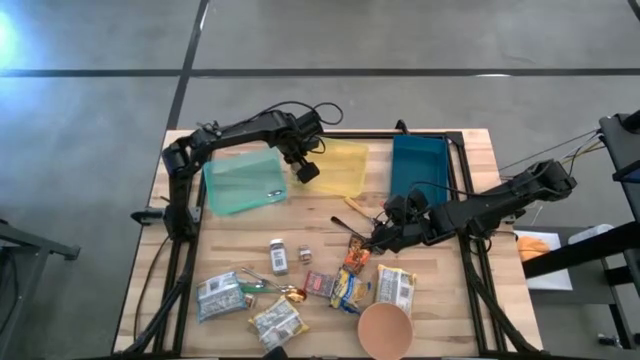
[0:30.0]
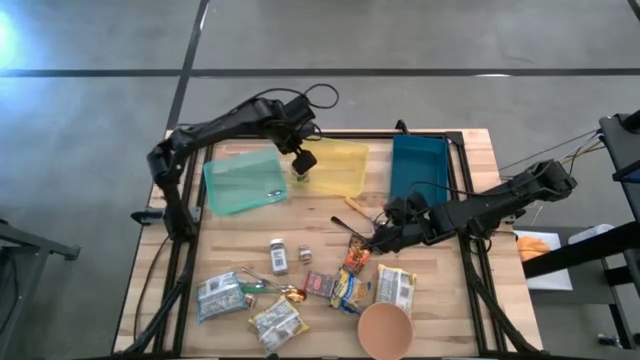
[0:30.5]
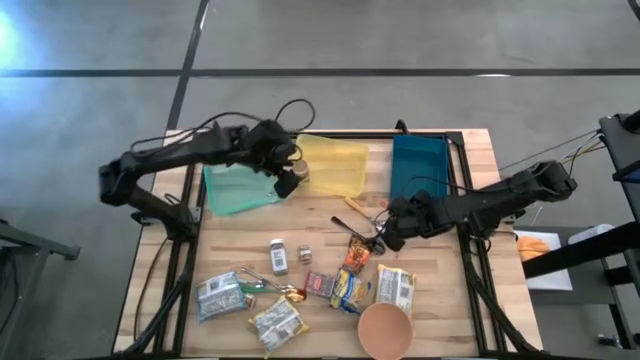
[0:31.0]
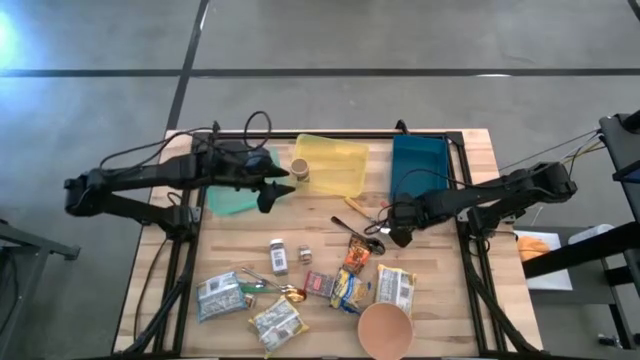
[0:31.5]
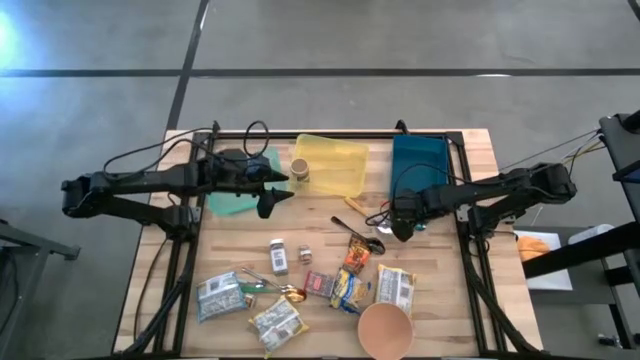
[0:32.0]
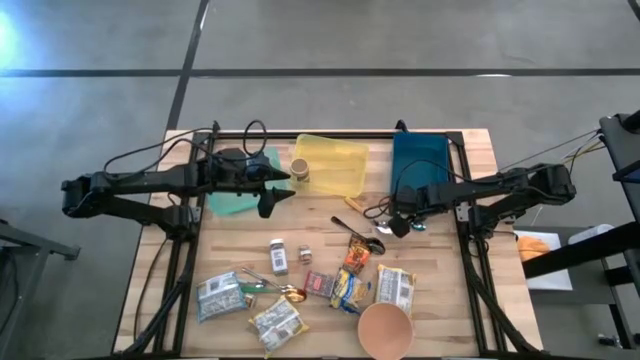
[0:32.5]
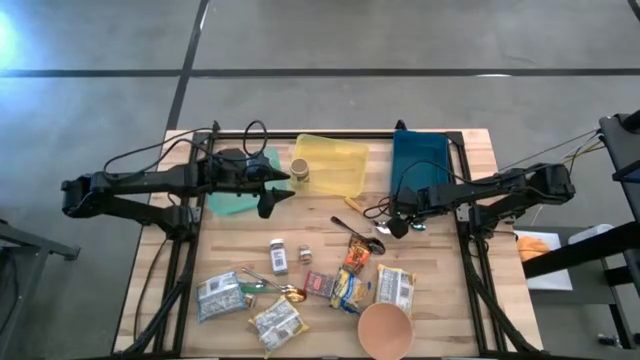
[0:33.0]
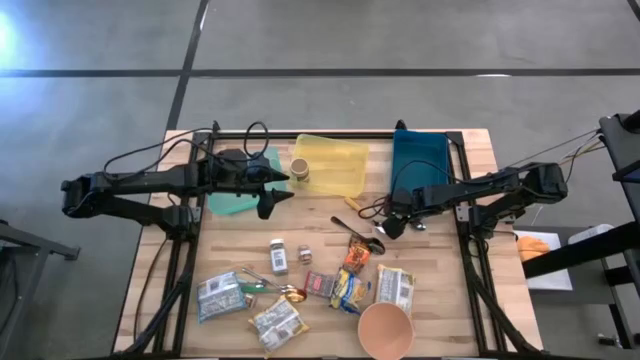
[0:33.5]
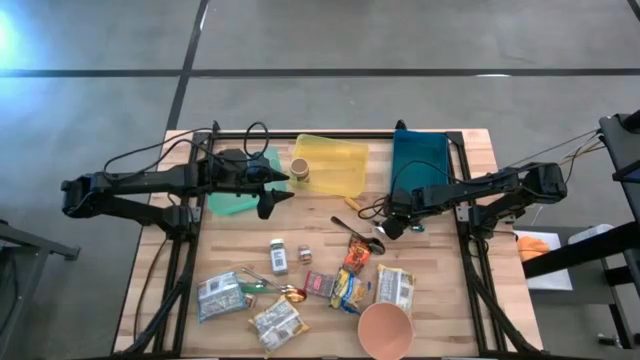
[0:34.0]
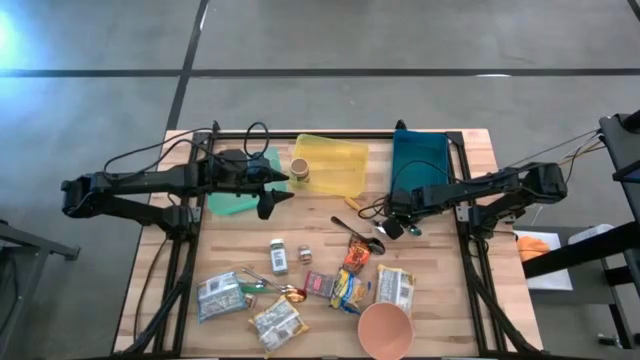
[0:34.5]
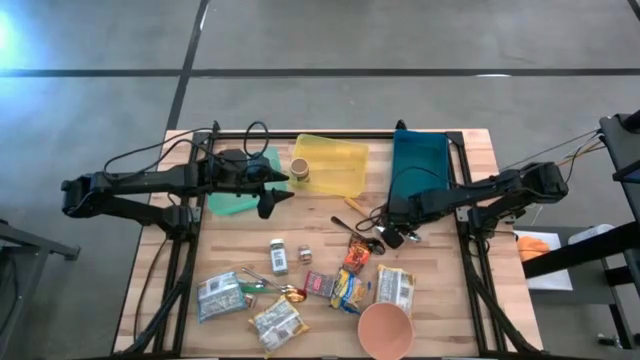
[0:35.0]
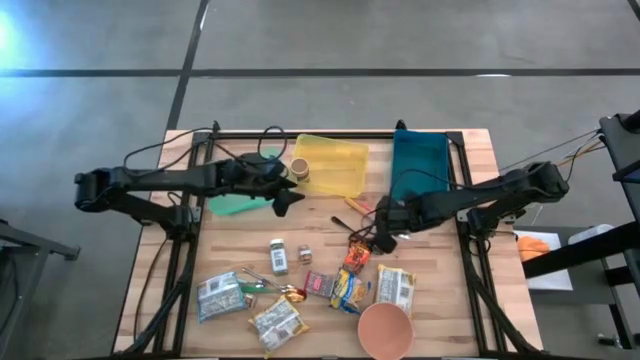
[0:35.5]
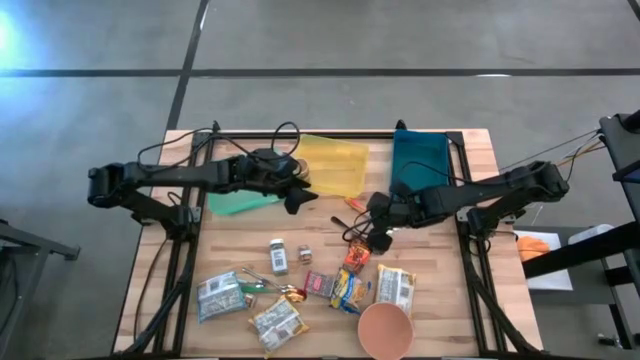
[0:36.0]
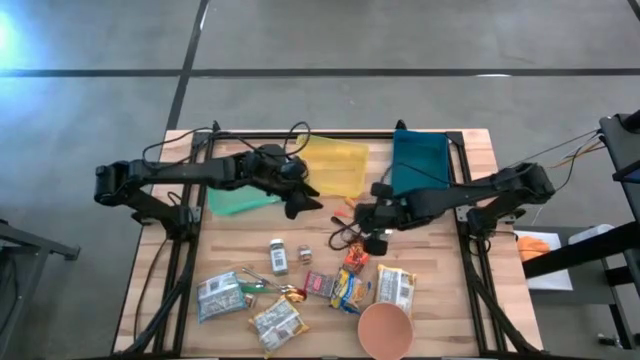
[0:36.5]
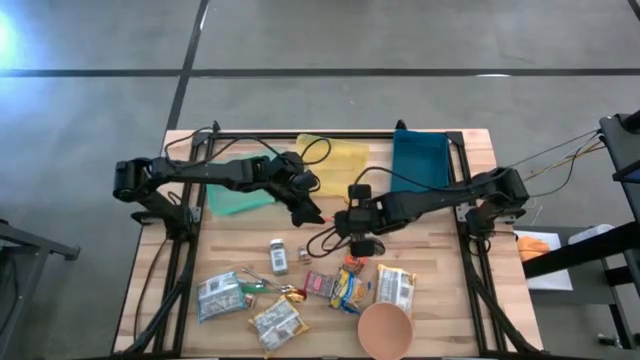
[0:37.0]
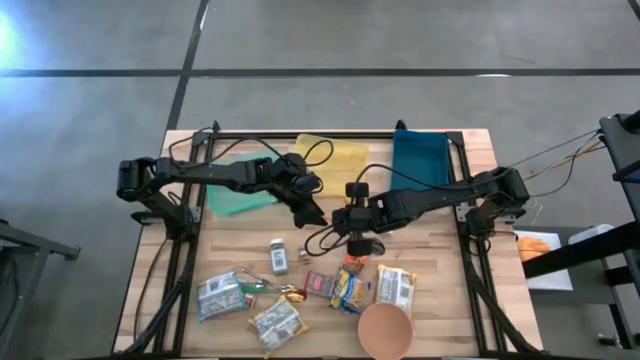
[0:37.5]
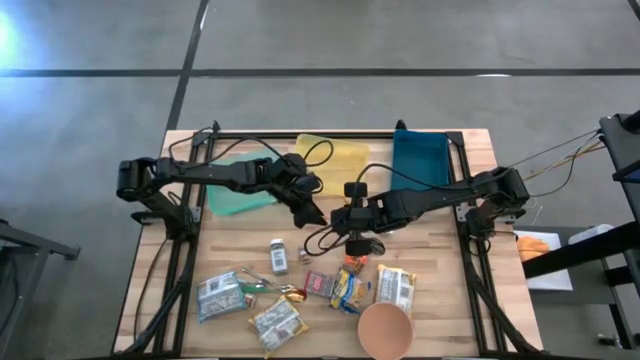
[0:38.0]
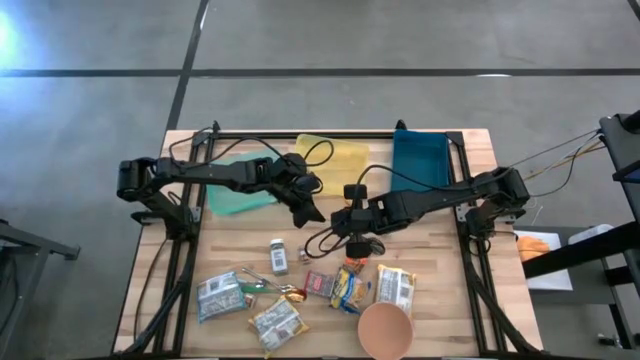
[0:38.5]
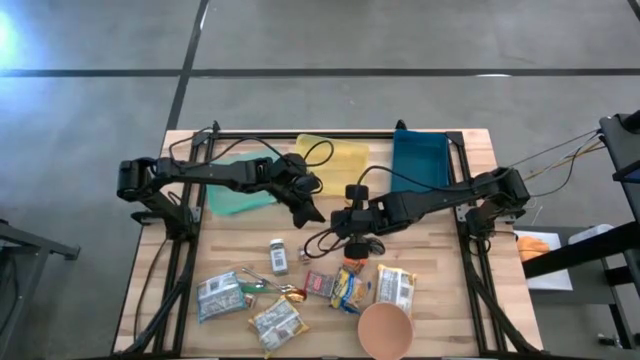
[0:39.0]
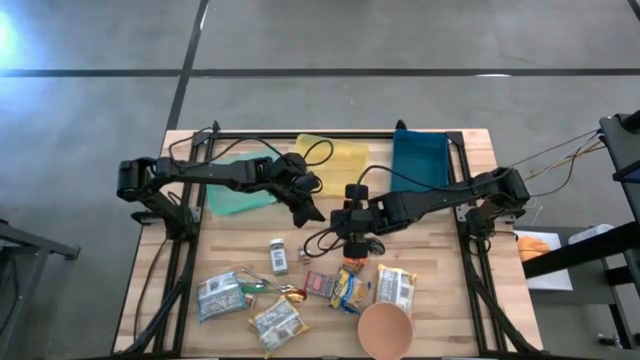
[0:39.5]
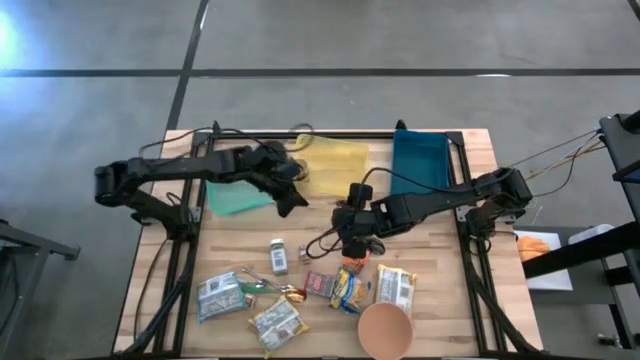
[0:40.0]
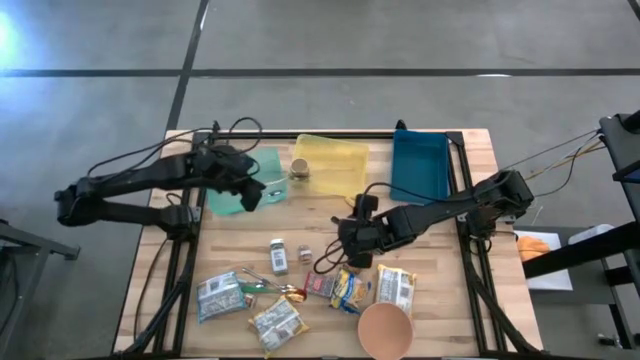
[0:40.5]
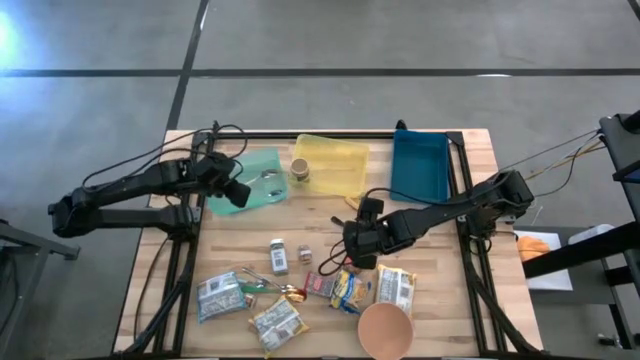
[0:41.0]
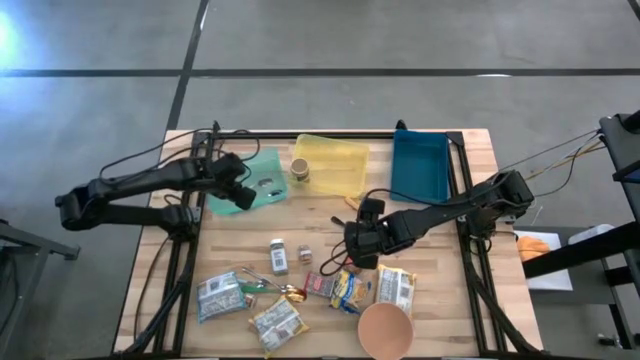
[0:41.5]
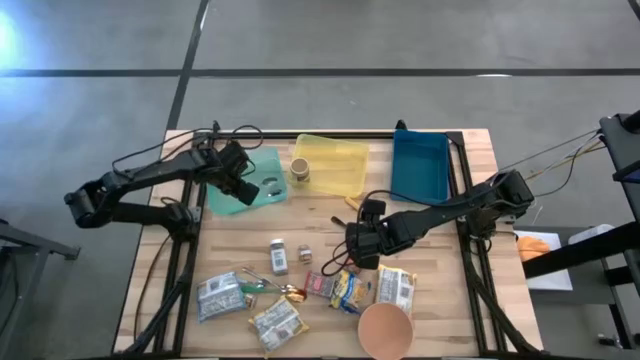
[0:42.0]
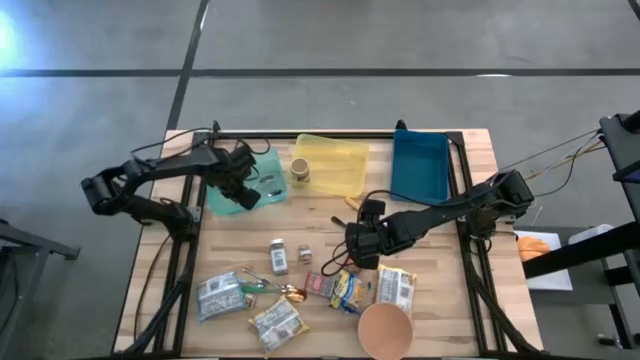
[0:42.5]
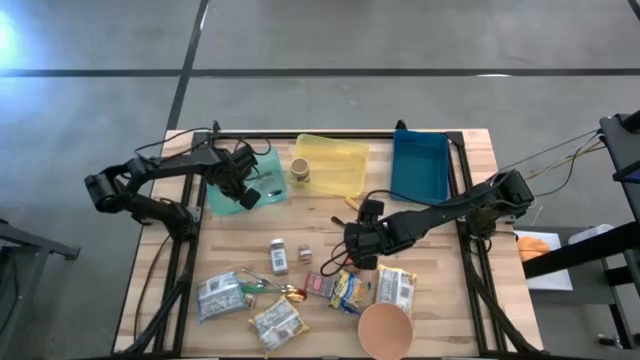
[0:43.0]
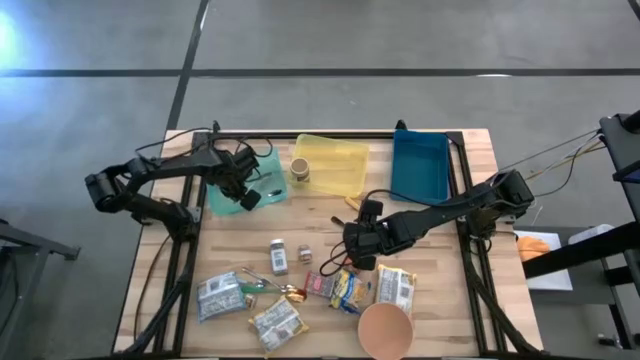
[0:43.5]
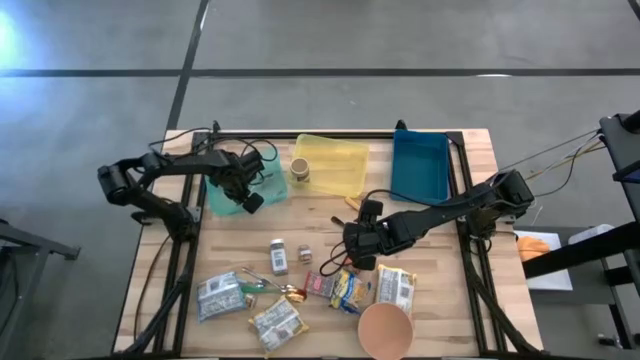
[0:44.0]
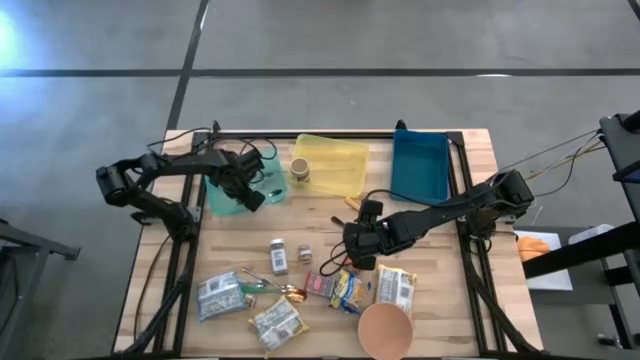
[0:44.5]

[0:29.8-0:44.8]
Put the orange spoon into the green bin
